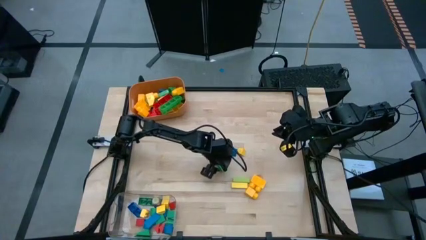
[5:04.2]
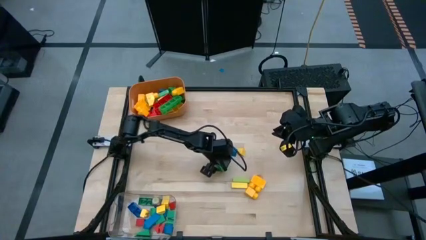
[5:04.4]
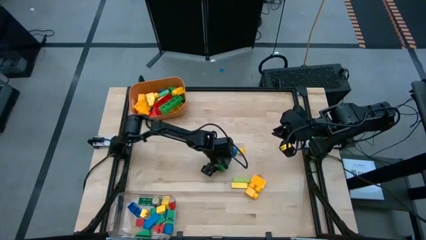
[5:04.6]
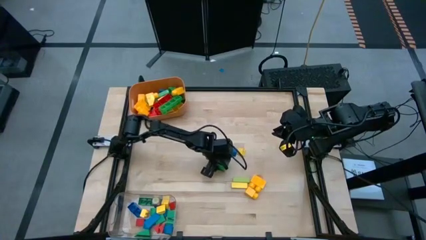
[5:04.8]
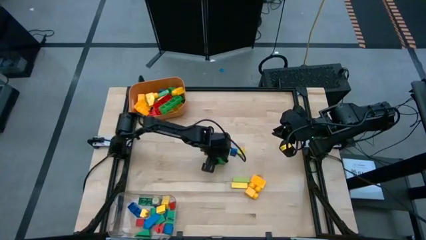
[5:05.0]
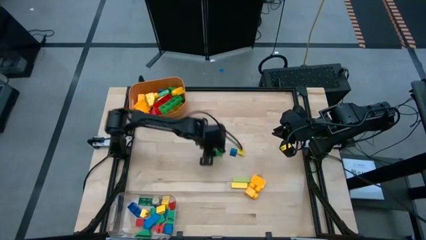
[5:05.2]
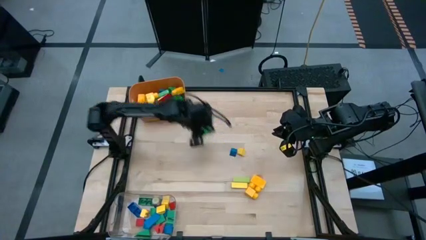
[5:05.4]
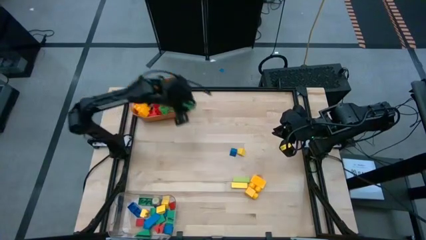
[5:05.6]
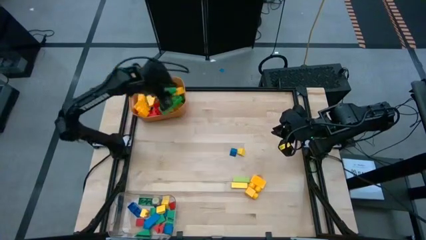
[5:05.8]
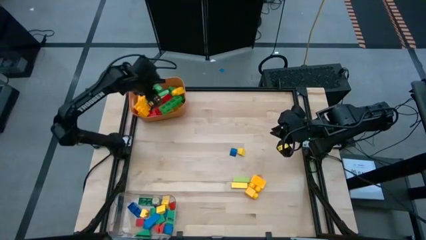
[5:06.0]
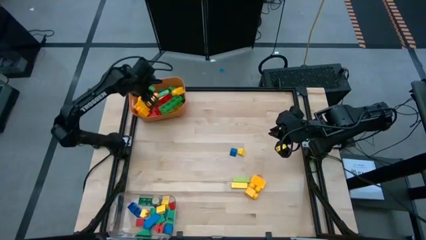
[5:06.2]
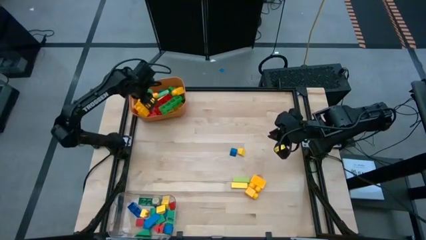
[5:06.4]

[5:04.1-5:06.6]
Task: Sort blocks by size
Put the big green game piece into the orange bin

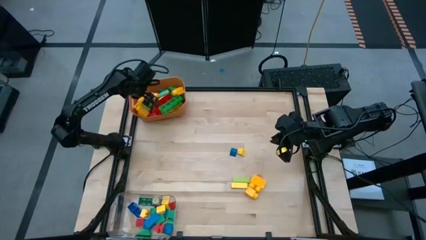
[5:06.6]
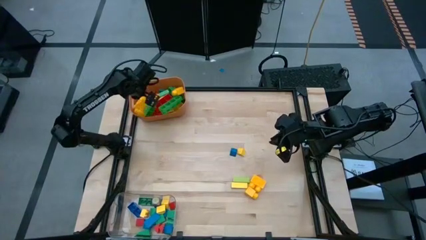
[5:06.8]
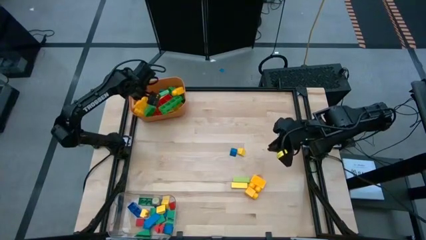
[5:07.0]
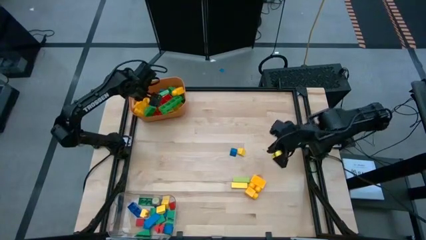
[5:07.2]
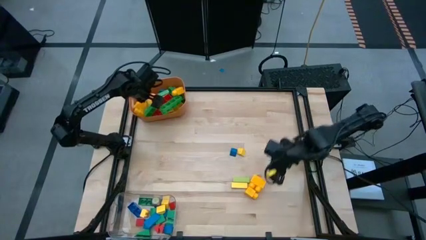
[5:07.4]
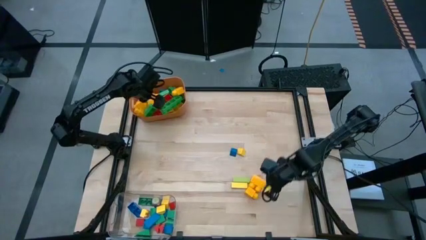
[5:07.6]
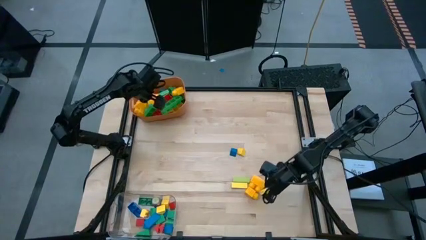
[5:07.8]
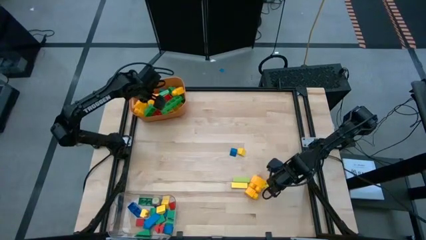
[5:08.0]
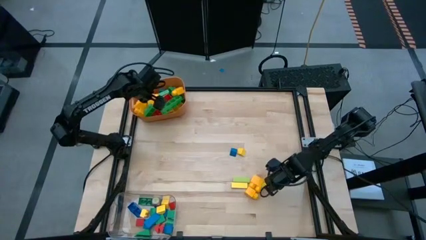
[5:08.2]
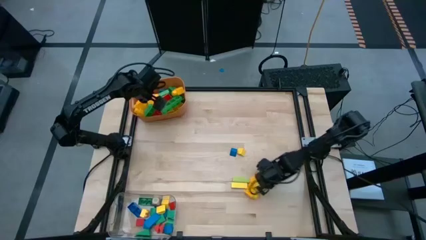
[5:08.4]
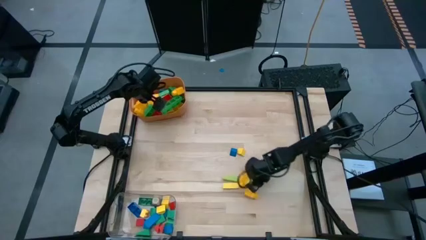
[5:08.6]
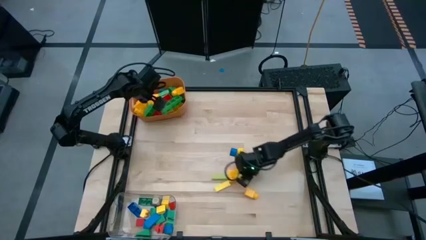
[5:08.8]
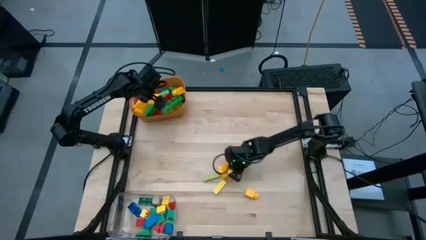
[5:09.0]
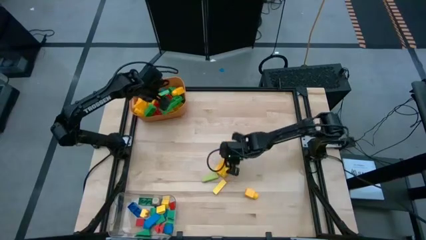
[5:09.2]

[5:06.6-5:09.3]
Adjust the yellow game piece

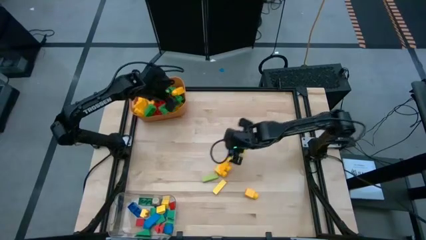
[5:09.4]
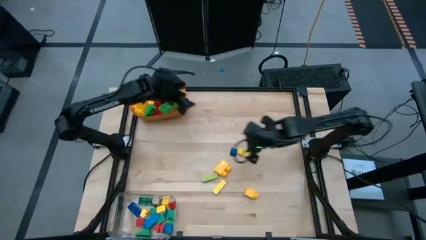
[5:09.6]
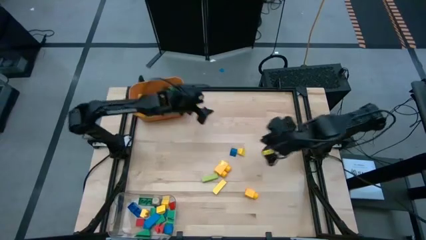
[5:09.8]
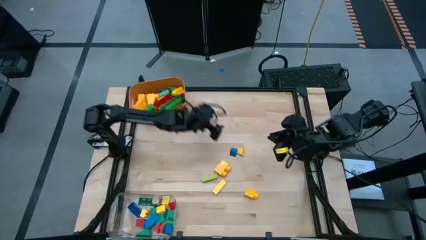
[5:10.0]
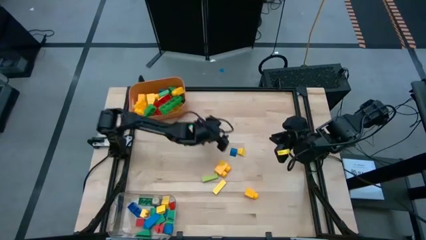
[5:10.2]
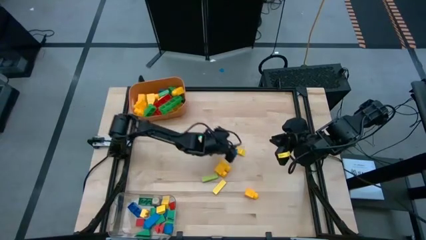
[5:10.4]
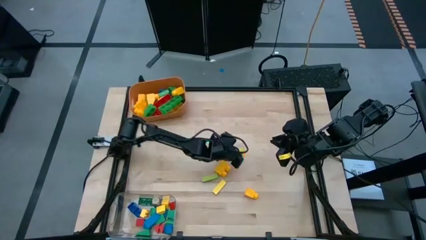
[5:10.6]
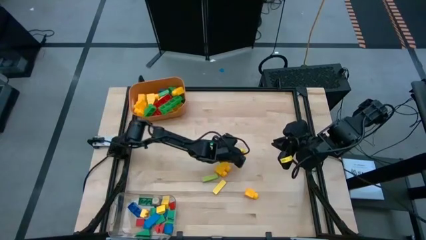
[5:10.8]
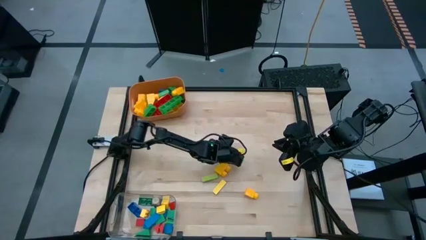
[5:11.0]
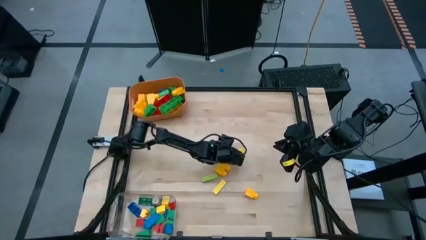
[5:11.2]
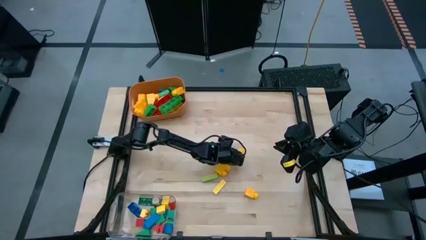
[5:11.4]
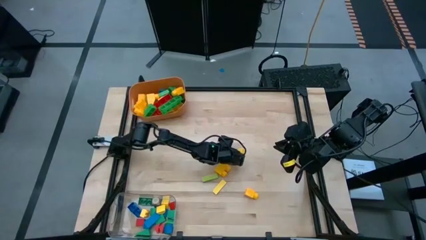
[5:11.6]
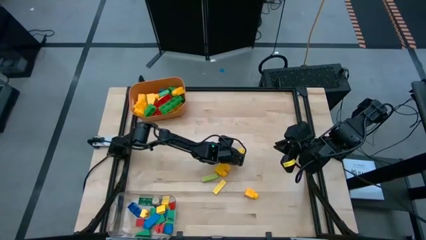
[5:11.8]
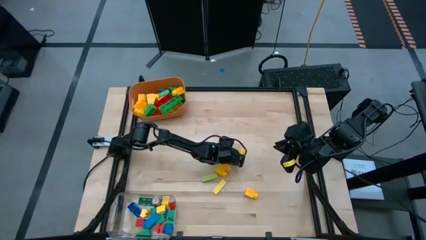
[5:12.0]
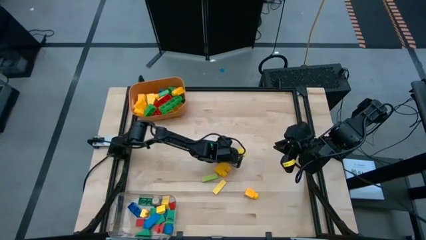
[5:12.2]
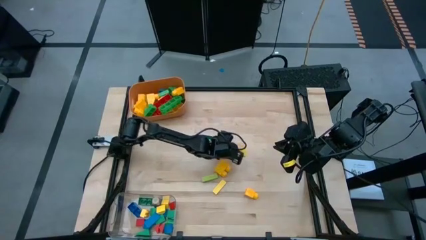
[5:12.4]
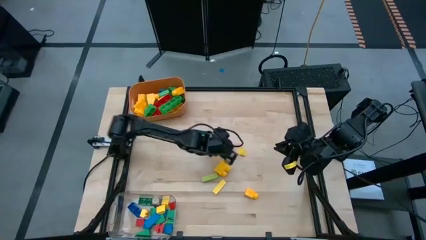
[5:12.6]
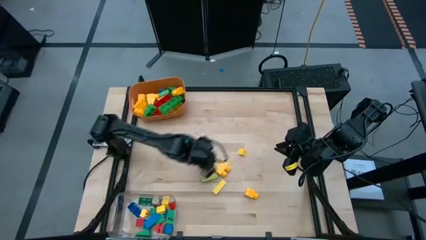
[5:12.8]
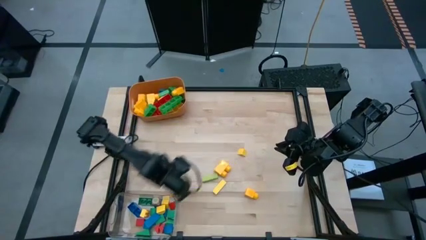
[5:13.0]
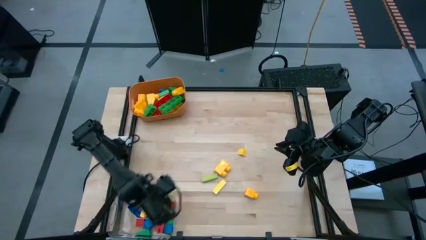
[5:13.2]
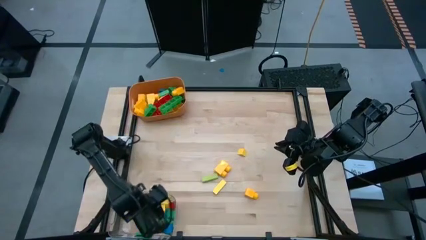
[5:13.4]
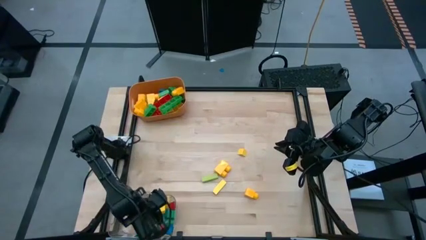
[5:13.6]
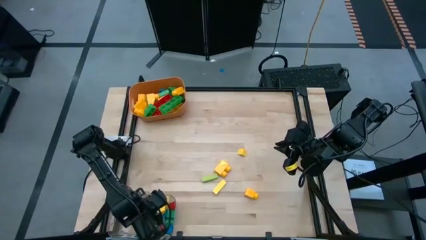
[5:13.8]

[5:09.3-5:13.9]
Put the small blue block into the bottom transparent bin

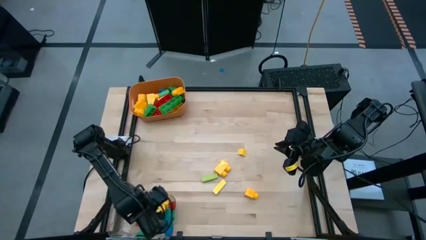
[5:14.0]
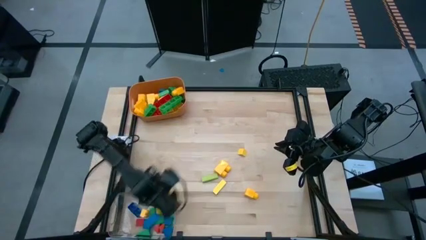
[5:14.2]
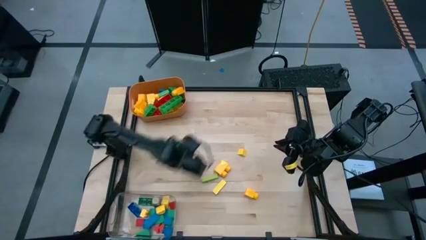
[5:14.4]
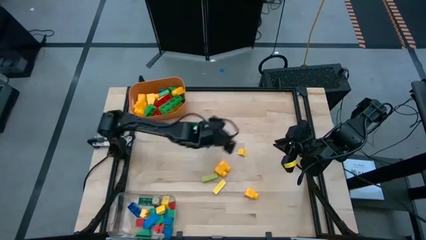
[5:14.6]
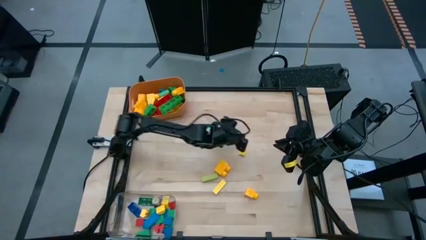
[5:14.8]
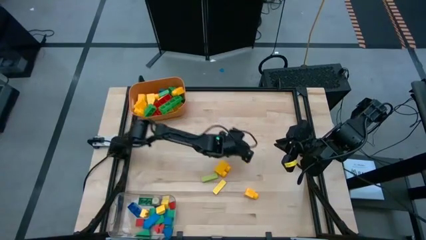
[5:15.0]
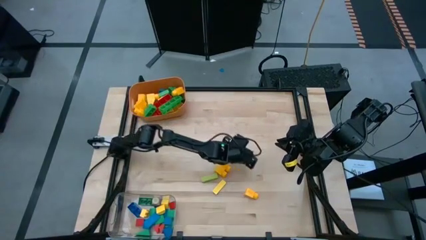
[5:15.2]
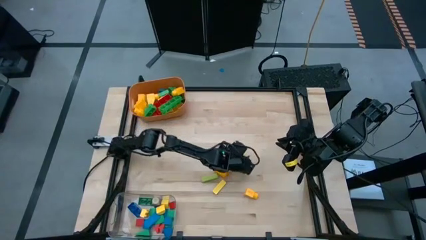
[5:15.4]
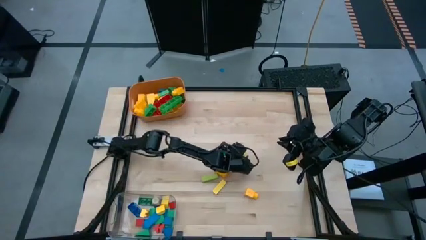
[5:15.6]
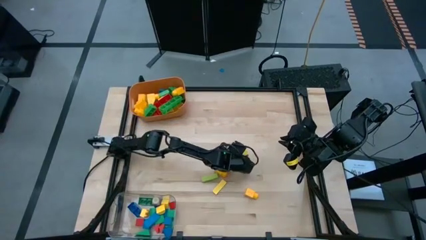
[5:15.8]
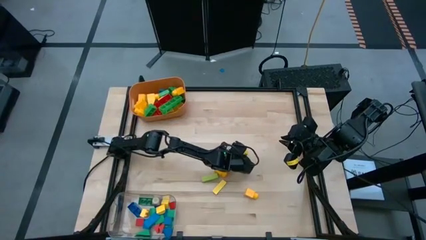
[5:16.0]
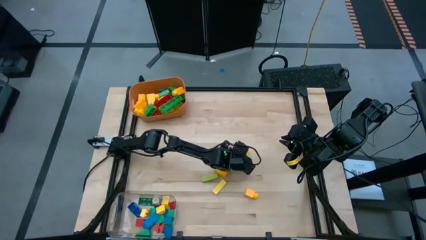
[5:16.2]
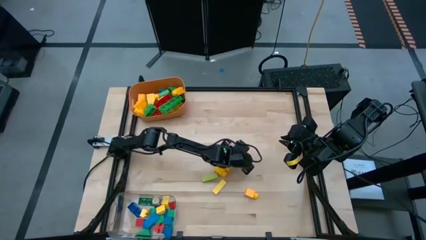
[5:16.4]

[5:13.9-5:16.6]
Put the small yellow block into the transparent bin

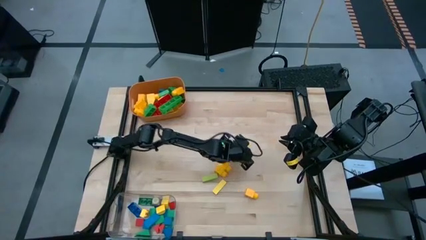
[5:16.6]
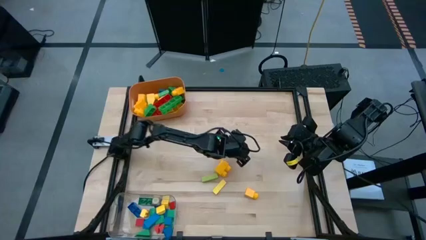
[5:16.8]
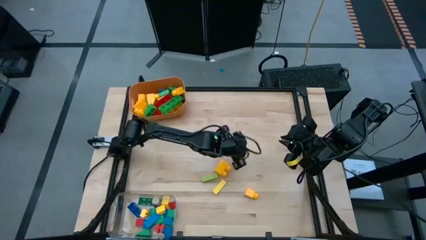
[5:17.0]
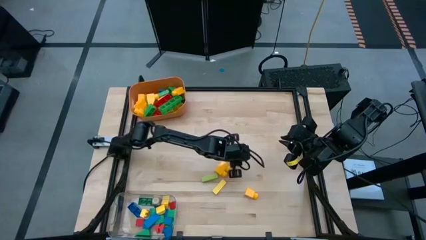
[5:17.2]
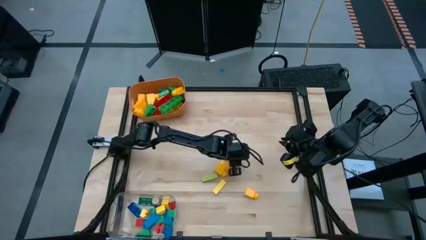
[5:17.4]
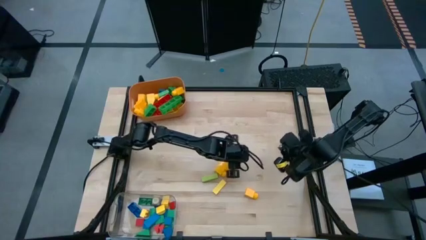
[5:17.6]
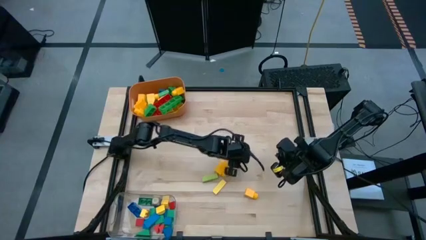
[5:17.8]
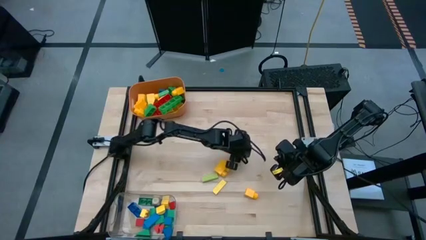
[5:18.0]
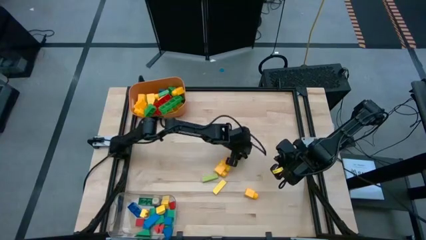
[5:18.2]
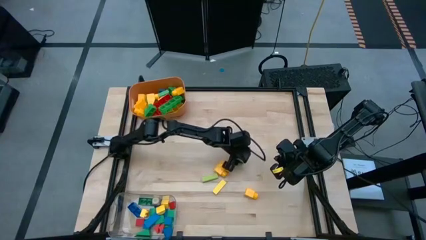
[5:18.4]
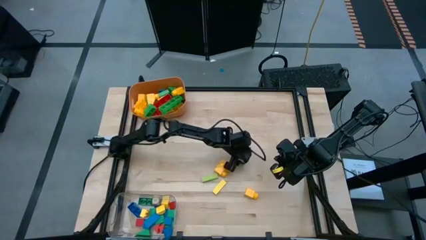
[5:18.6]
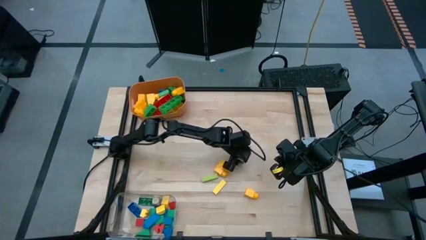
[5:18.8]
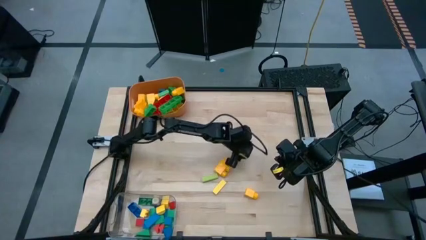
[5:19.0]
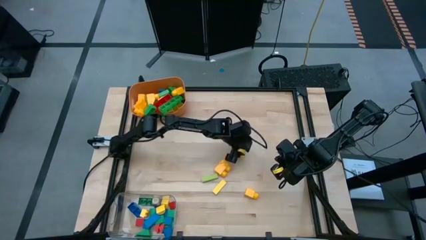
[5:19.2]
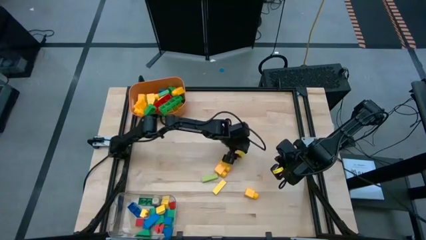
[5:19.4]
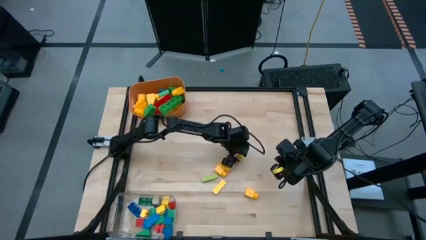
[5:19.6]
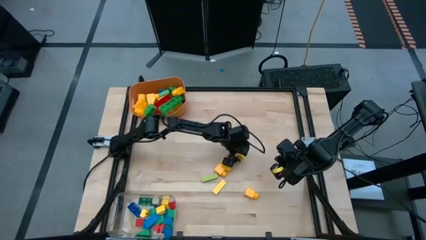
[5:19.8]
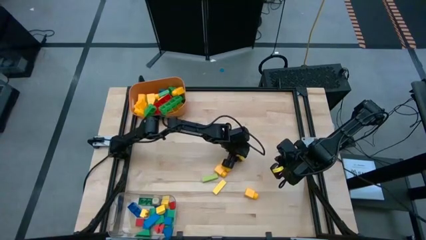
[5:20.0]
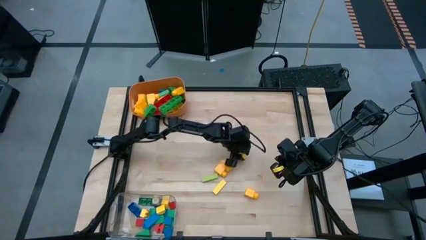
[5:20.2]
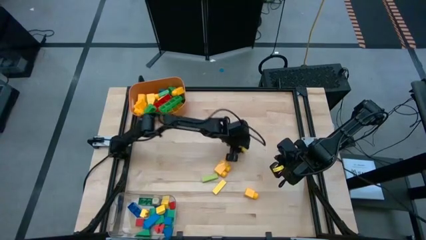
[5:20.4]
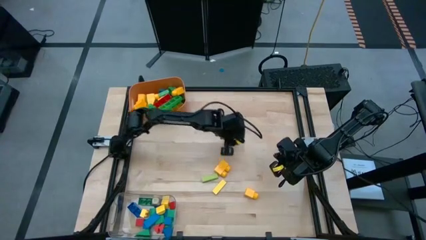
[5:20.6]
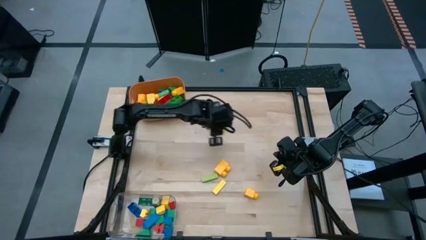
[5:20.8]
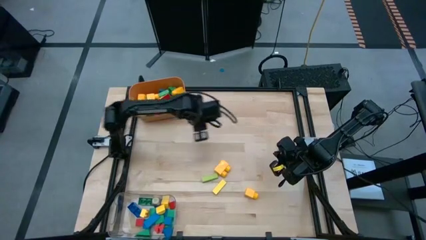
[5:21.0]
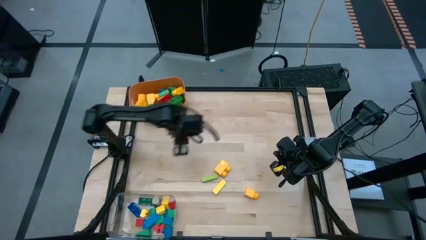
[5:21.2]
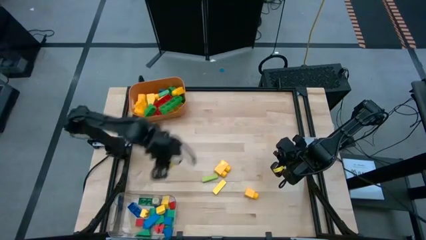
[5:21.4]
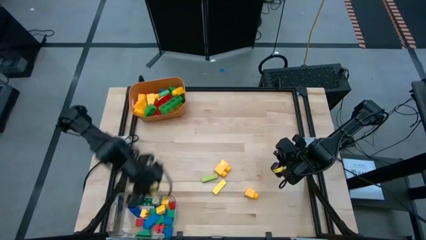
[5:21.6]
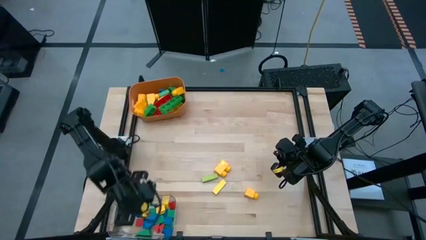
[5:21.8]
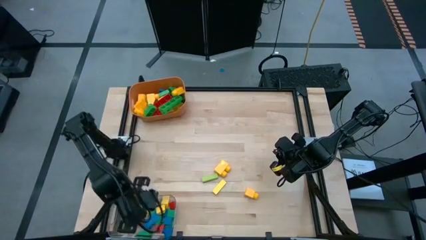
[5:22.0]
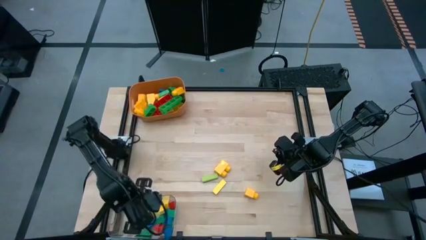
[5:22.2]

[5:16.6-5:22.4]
Put the small yellow block into the transparent bin
